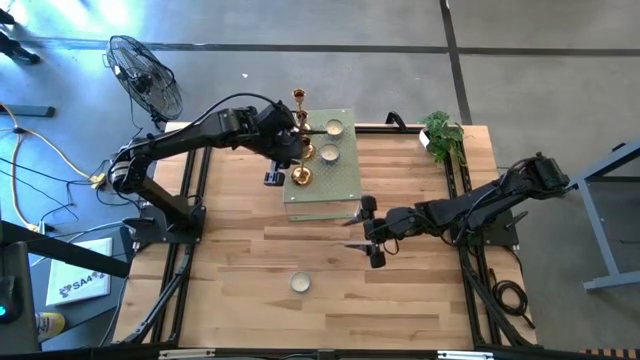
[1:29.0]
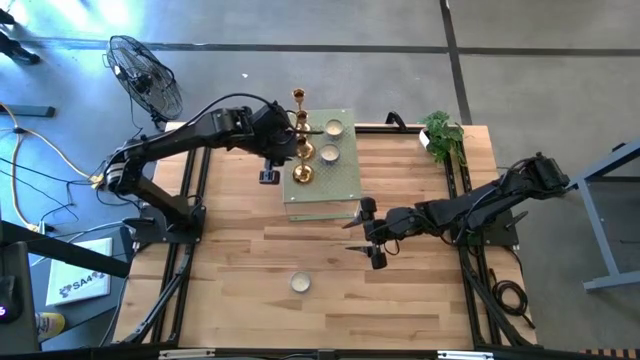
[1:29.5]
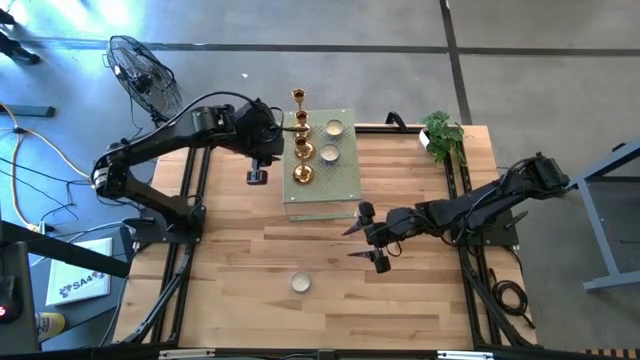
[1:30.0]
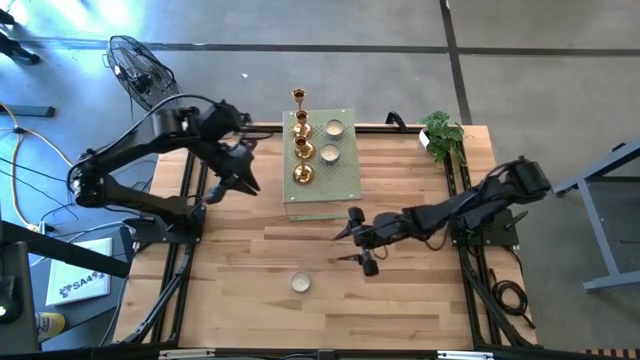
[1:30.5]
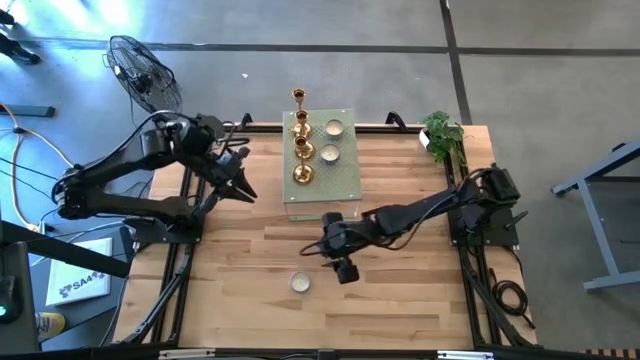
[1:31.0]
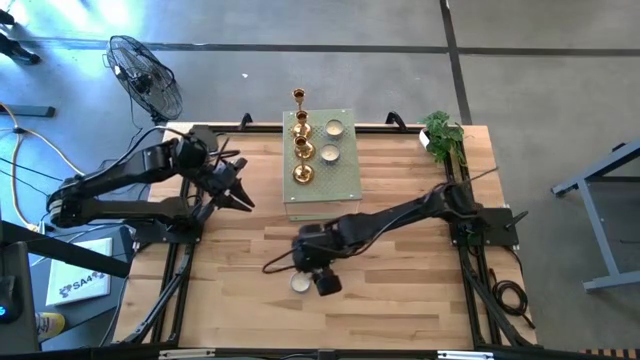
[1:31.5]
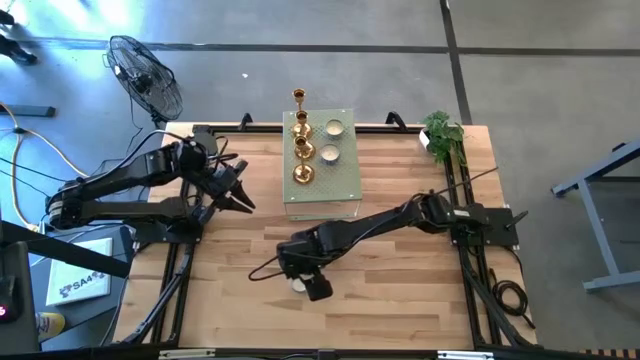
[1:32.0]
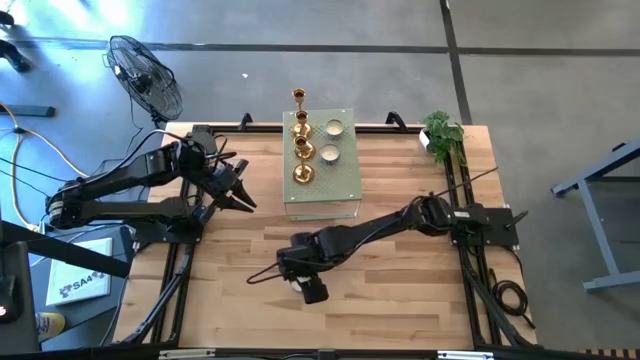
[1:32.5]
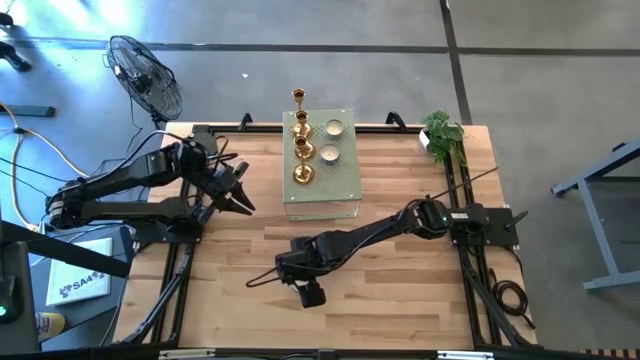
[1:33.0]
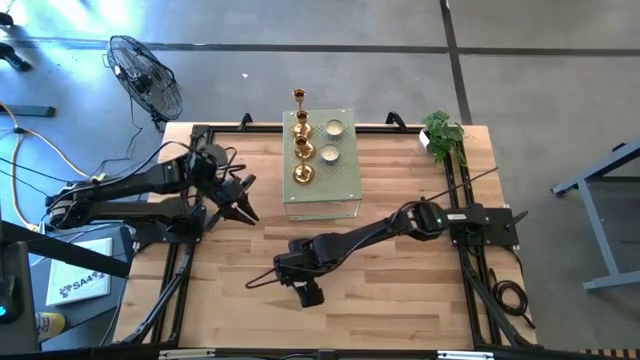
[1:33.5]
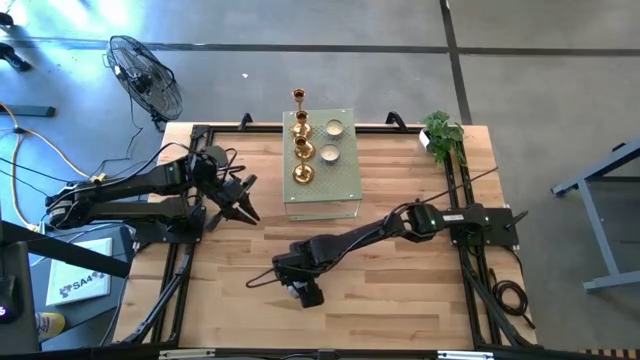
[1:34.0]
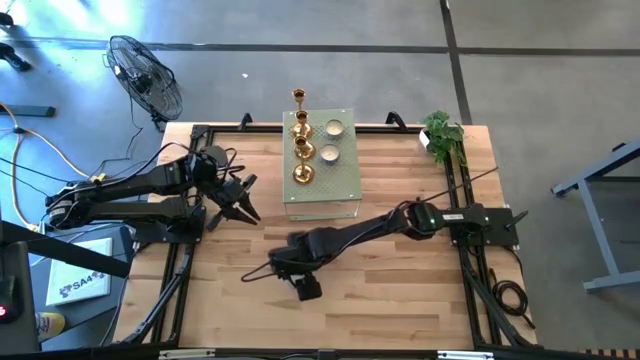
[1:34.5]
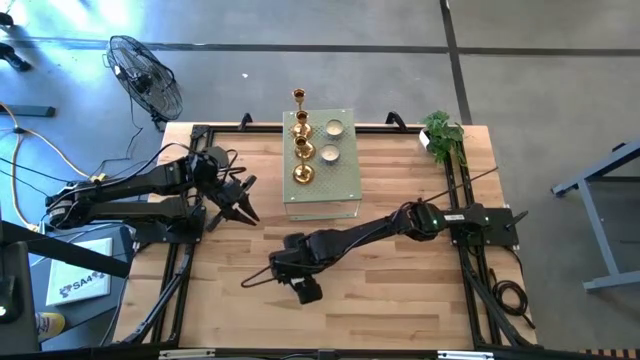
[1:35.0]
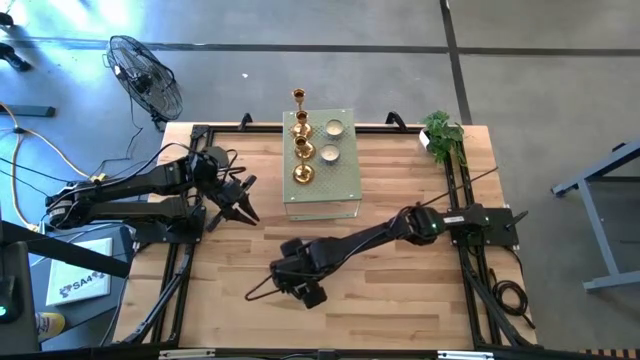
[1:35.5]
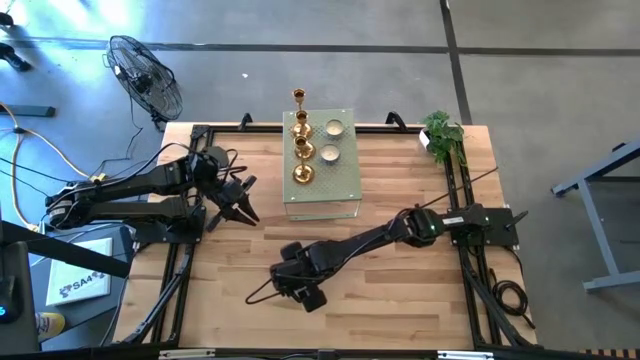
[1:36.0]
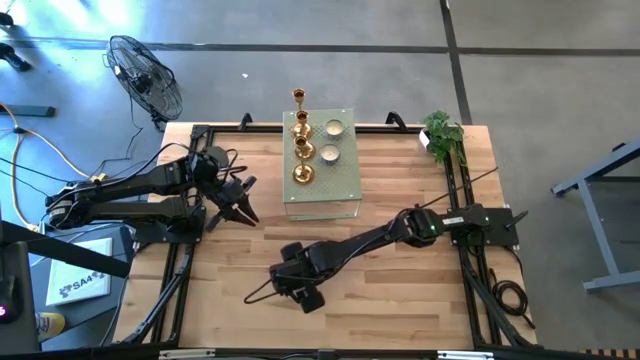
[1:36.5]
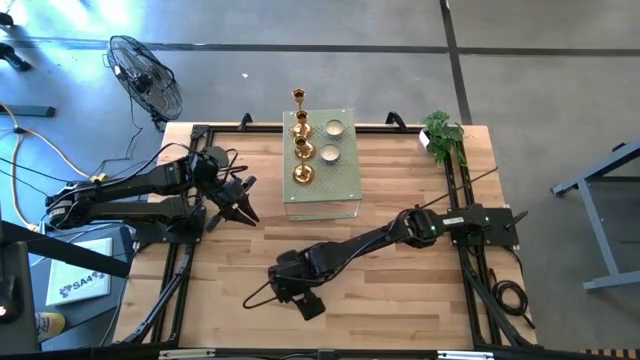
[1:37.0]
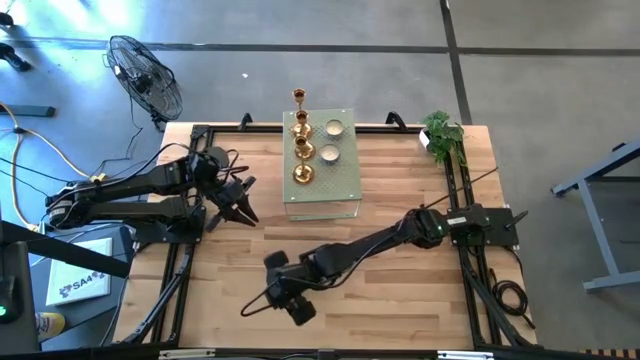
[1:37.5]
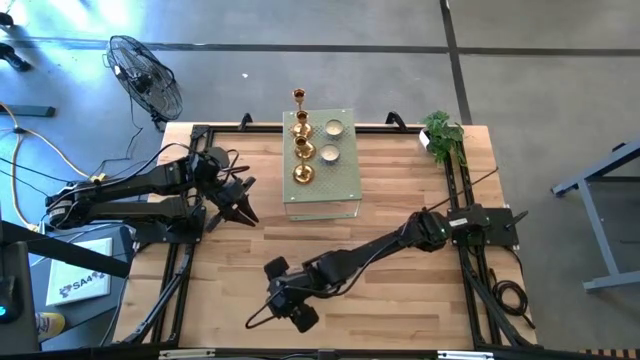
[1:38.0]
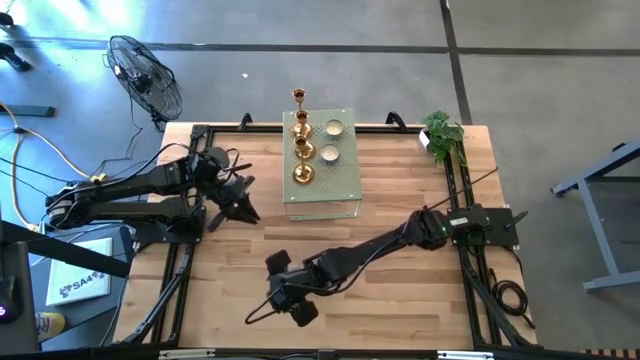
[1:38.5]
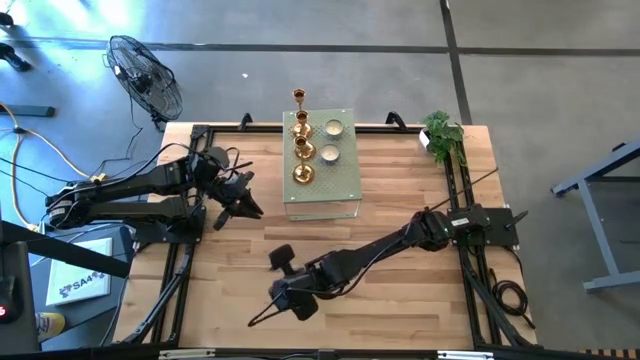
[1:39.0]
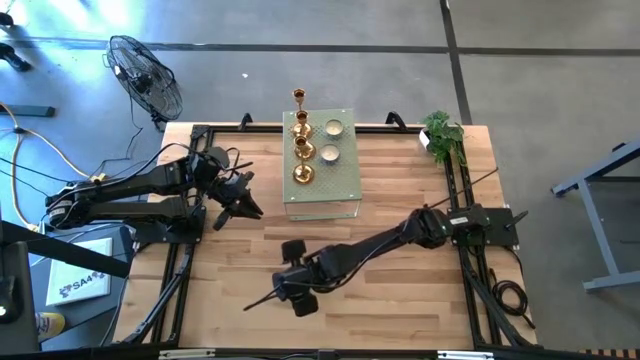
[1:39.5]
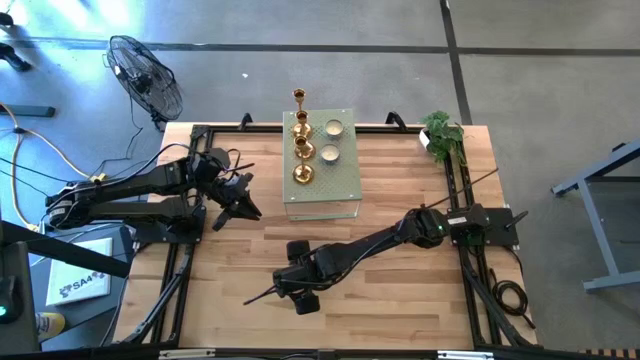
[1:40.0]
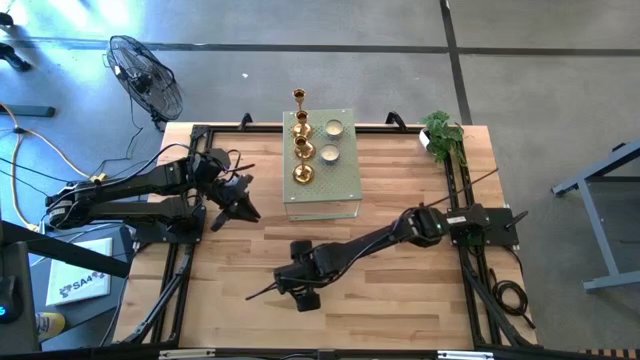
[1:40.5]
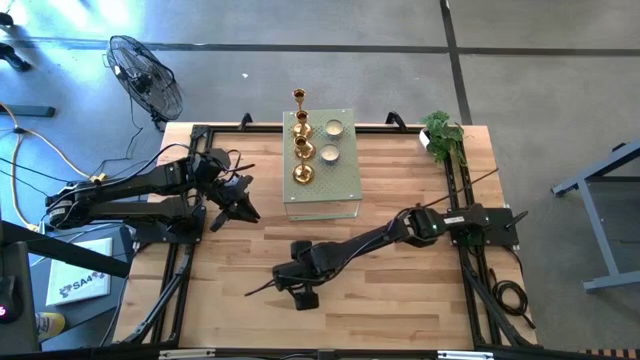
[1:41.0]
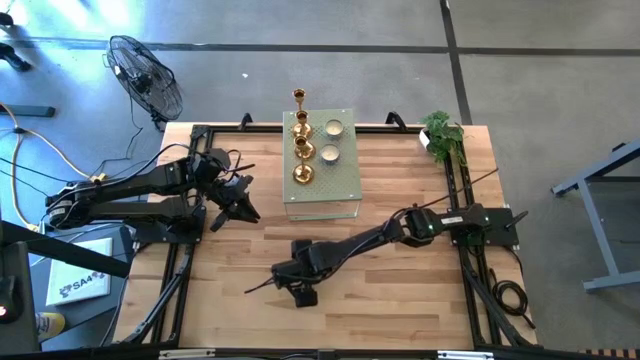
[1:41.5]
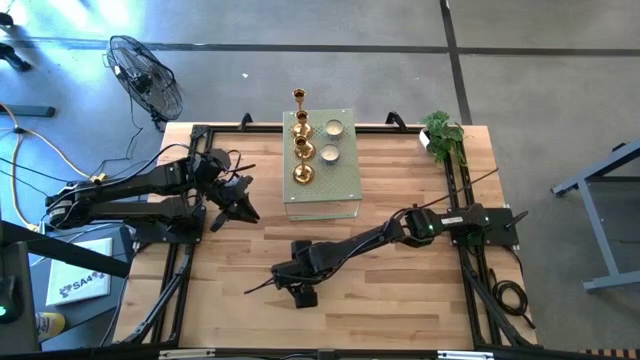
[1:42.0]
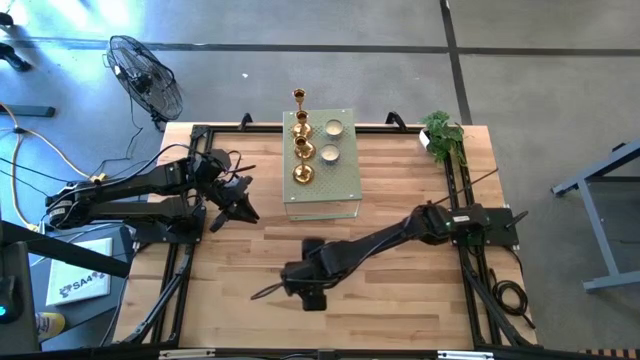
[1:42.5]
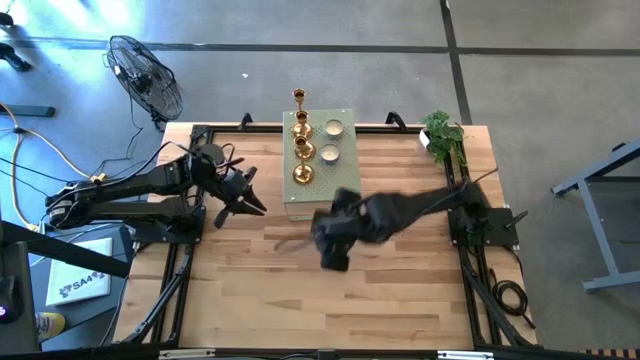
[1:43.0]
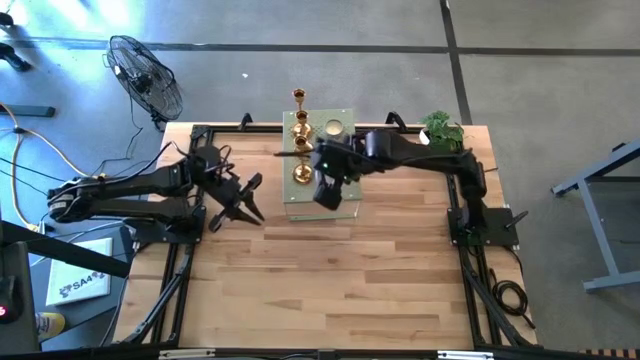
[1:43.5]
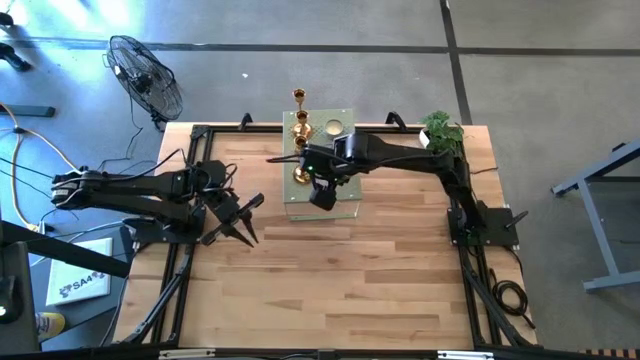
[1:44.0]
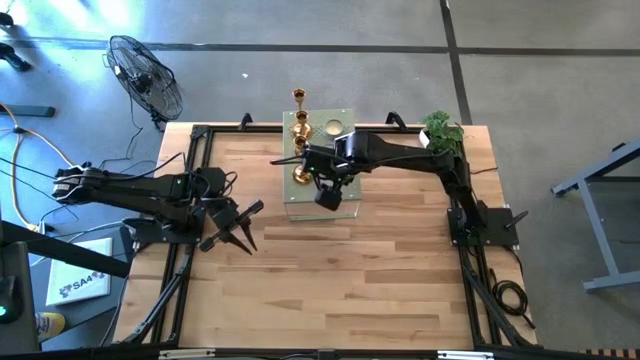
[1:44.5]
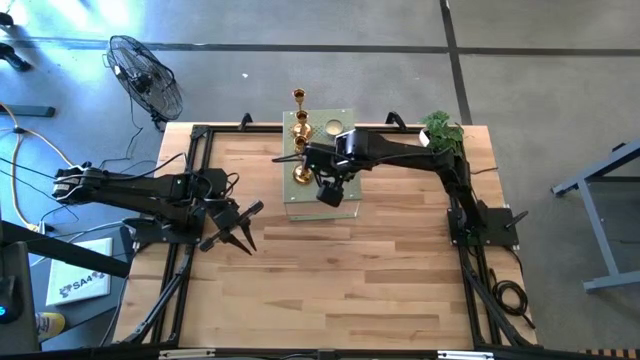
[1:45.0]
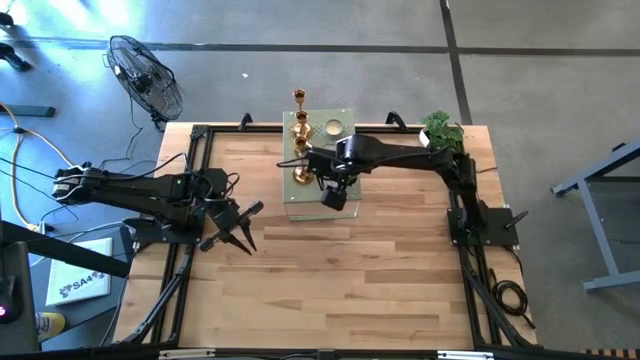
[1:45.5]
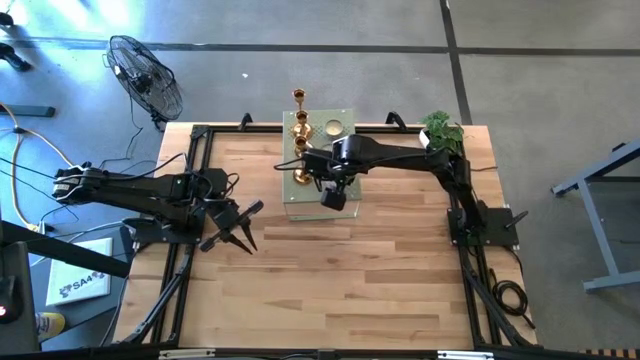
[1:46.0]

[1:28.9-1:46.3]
Task: Pick & Place candle stick holders
Put the blue scented candle on the shelf aligned with the blue scented candles

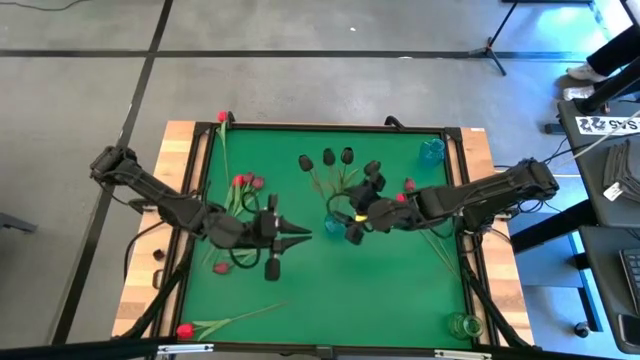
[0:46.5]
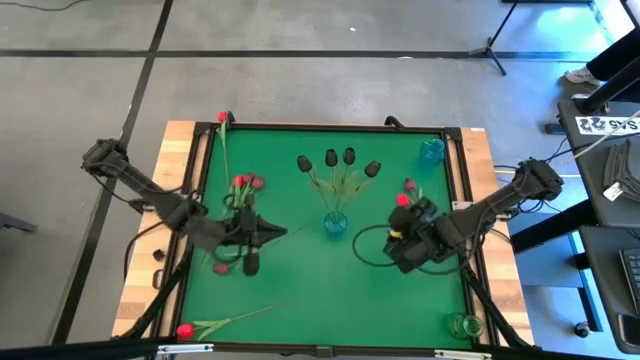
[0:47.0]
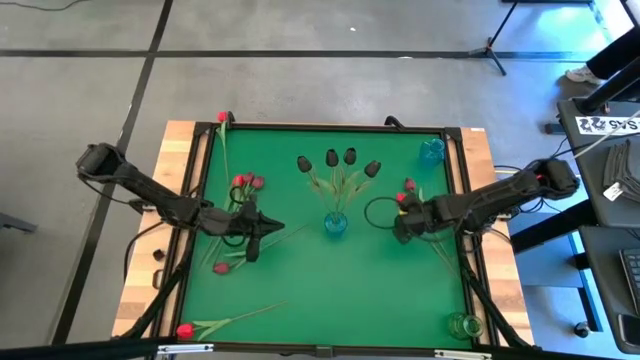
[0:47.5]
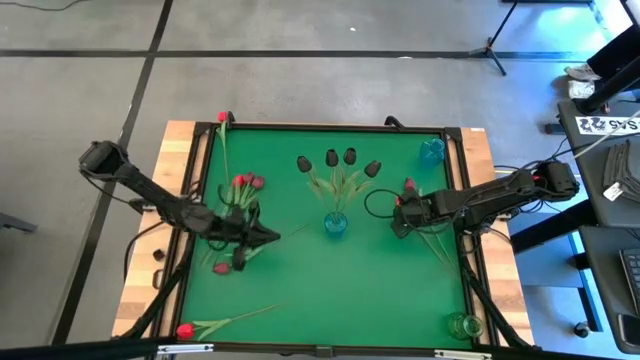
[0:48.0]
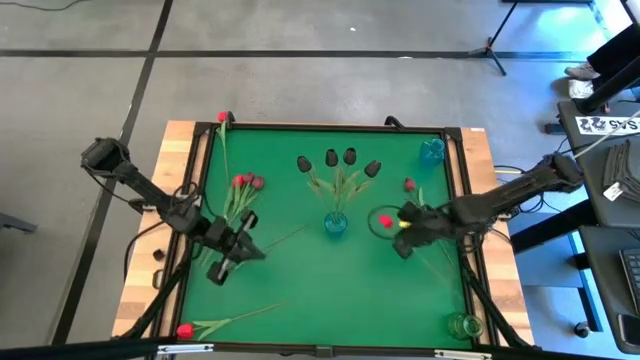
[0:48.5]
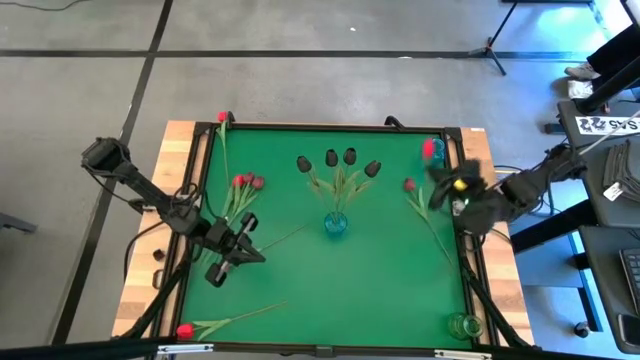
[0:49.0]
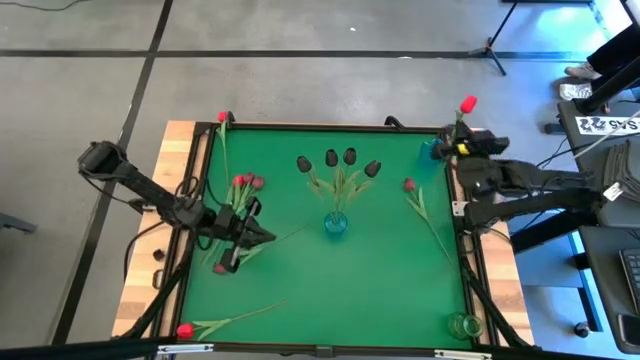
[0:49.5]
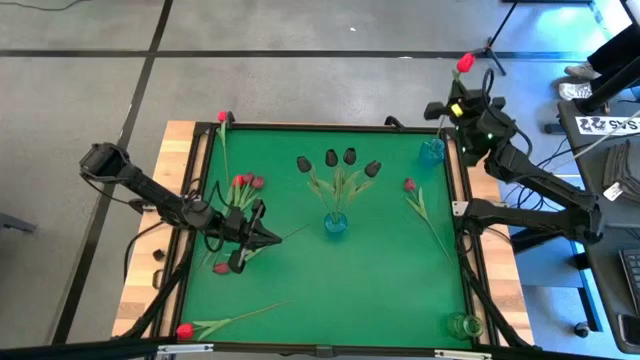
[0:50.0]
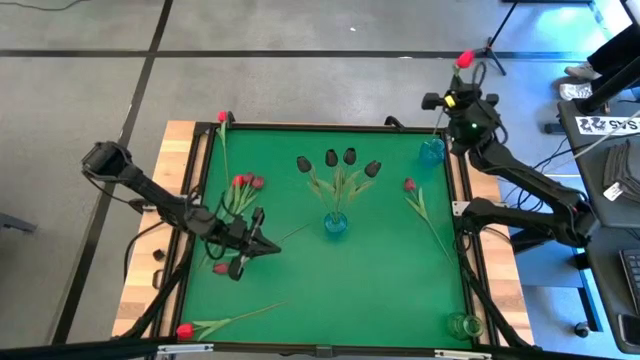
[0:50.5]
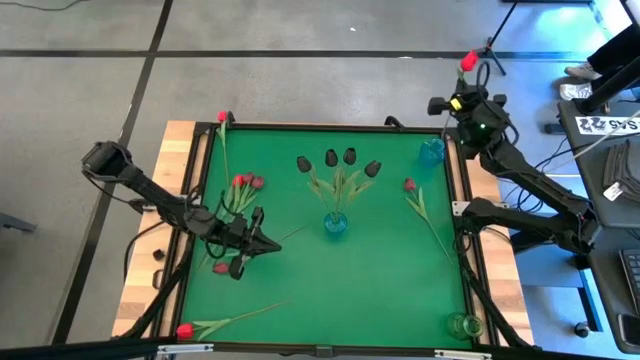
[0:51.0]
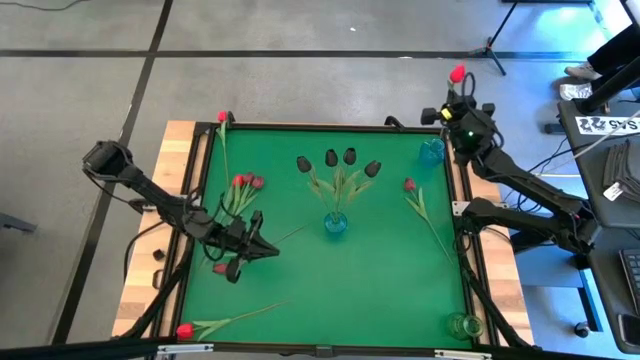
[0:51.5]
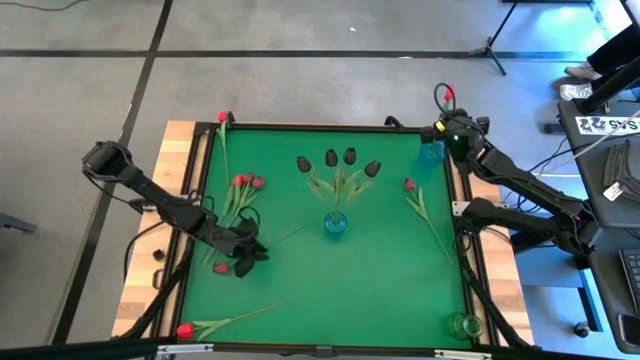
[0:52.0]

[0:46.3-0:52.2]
Task: Sort flowers into vase by color
Put the red tulip into the top blue vase
